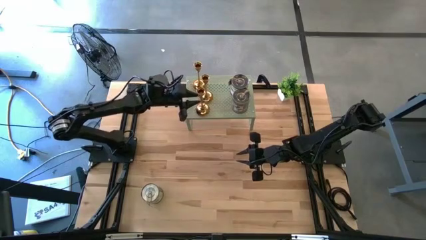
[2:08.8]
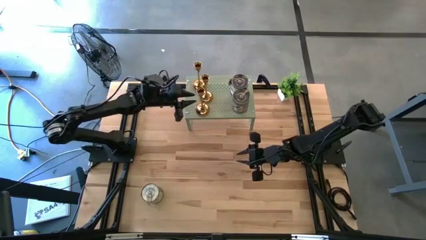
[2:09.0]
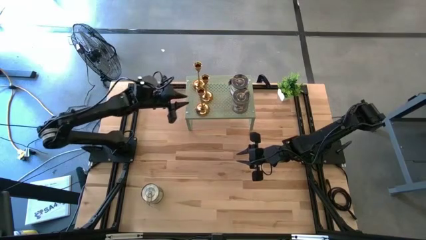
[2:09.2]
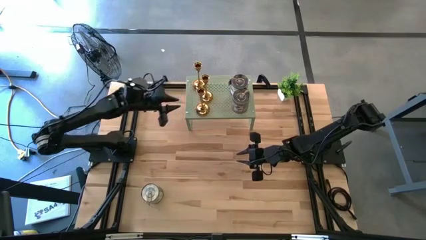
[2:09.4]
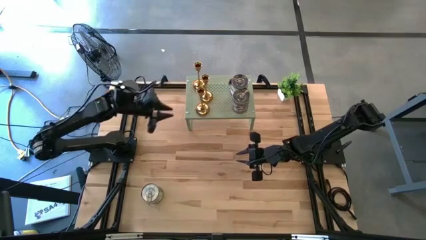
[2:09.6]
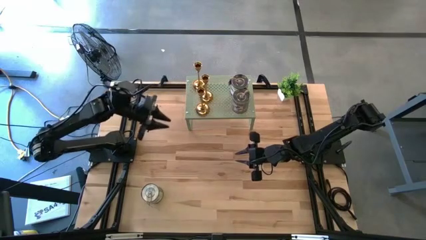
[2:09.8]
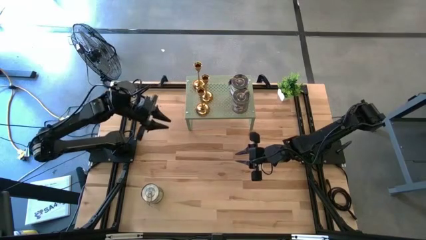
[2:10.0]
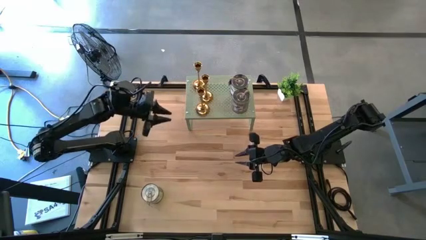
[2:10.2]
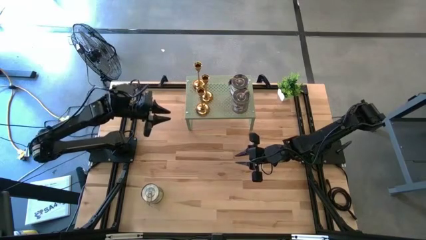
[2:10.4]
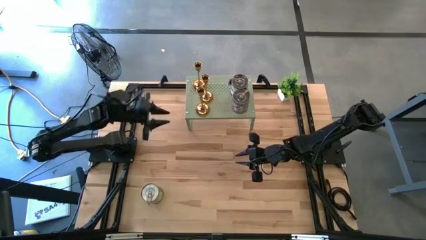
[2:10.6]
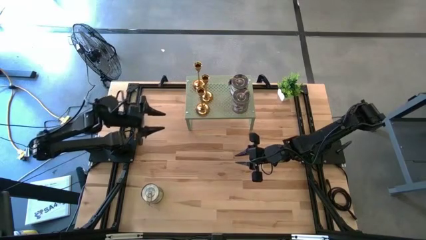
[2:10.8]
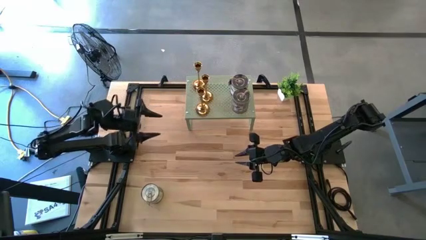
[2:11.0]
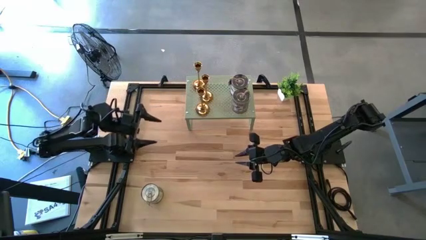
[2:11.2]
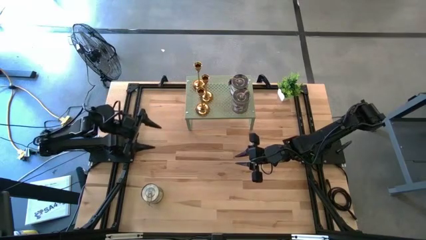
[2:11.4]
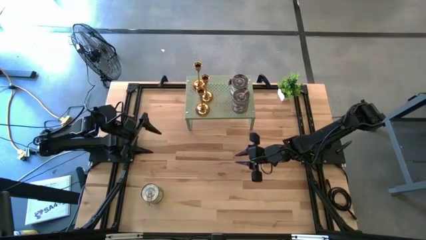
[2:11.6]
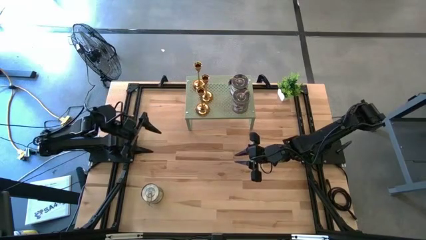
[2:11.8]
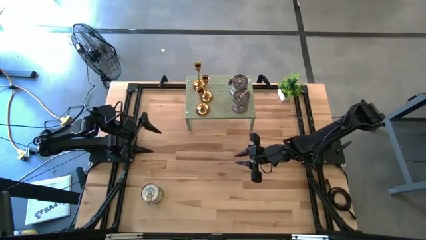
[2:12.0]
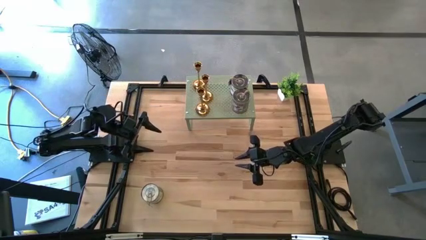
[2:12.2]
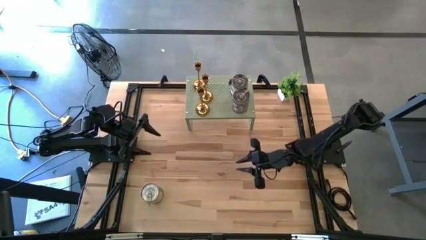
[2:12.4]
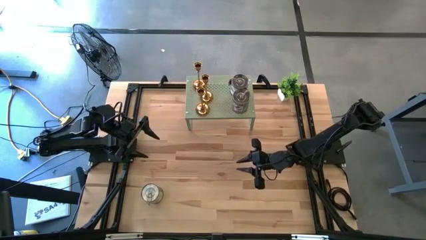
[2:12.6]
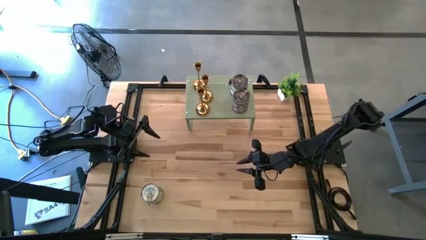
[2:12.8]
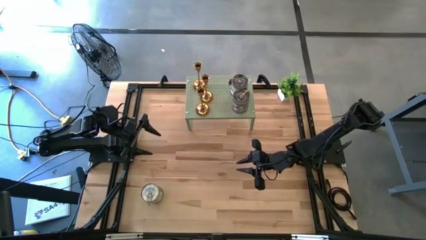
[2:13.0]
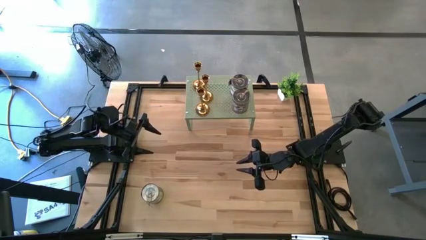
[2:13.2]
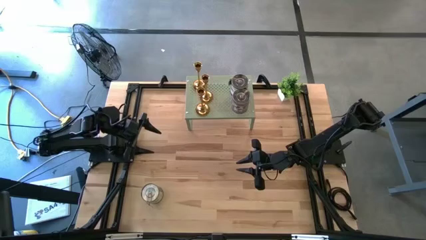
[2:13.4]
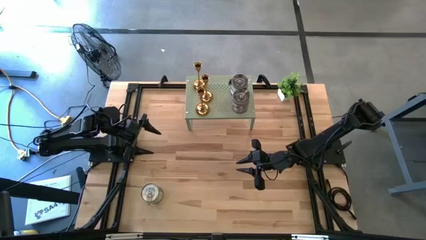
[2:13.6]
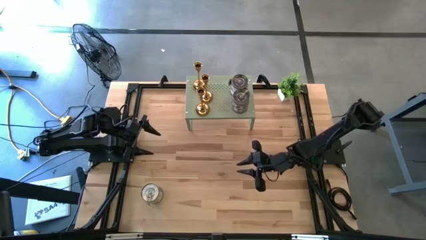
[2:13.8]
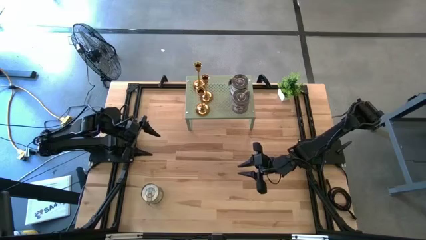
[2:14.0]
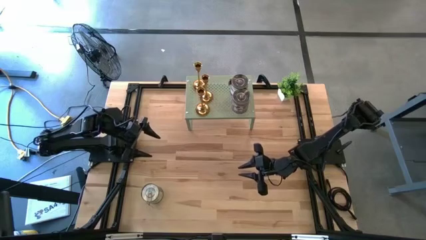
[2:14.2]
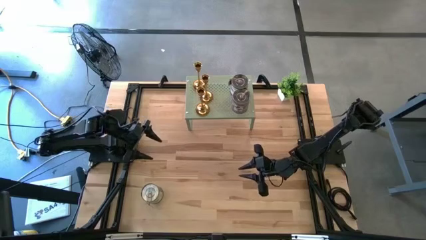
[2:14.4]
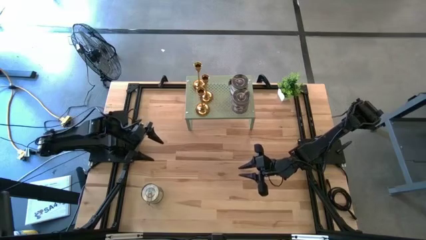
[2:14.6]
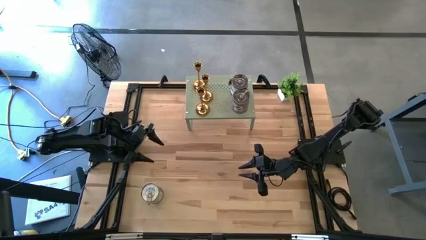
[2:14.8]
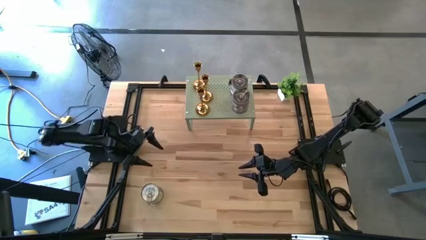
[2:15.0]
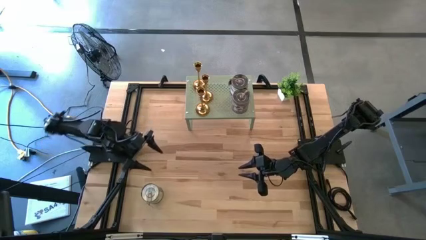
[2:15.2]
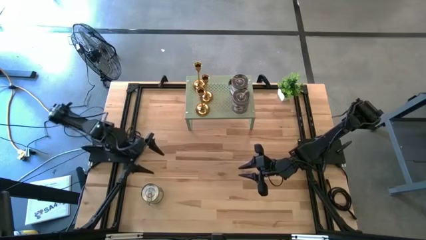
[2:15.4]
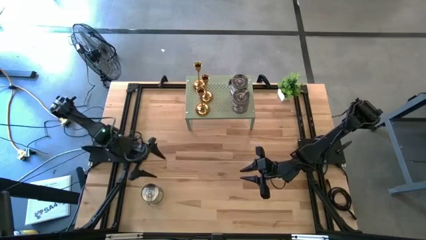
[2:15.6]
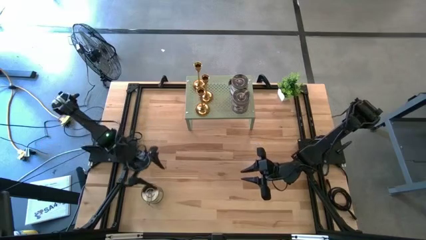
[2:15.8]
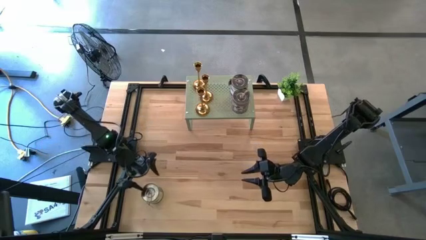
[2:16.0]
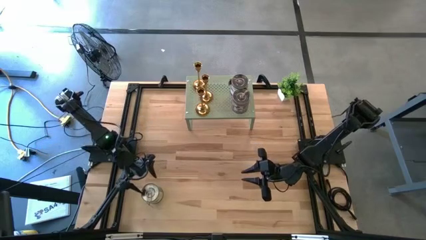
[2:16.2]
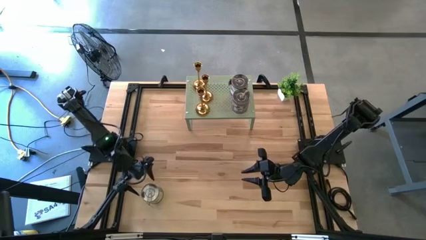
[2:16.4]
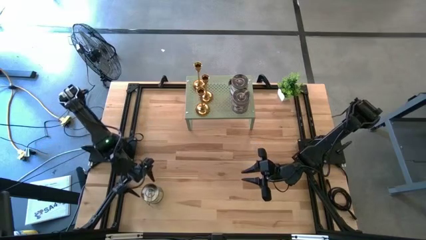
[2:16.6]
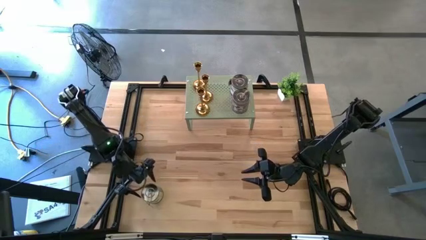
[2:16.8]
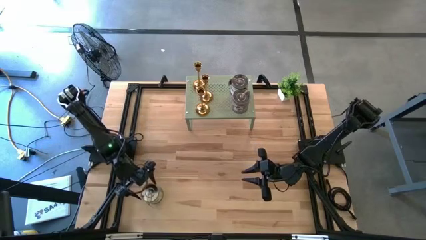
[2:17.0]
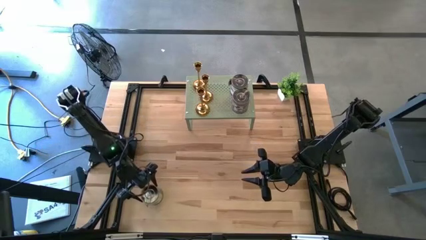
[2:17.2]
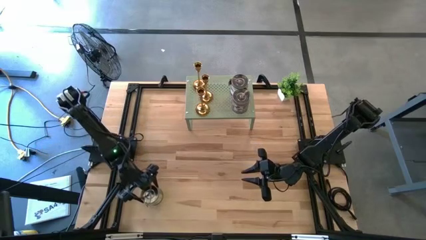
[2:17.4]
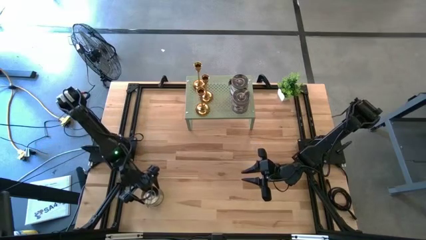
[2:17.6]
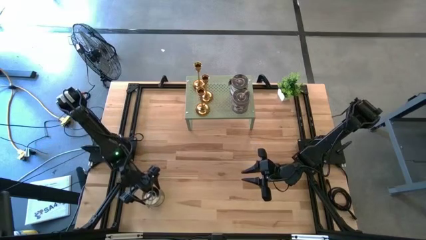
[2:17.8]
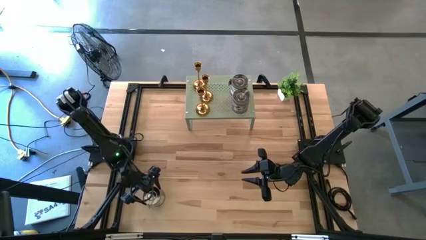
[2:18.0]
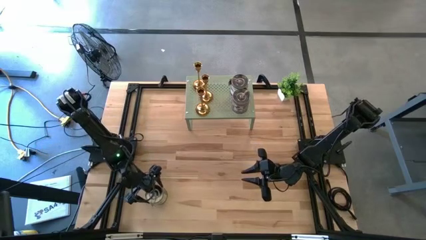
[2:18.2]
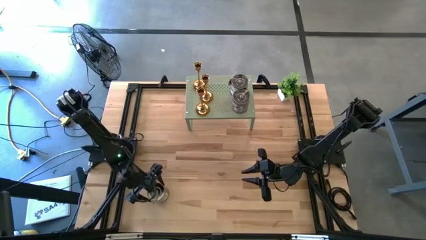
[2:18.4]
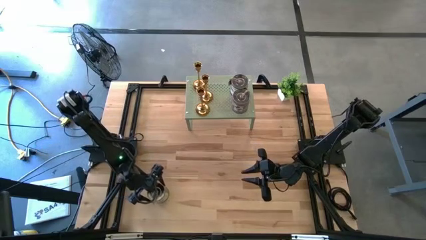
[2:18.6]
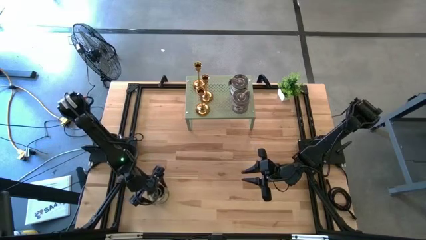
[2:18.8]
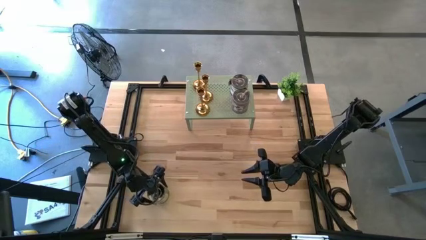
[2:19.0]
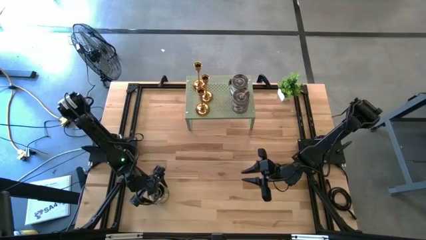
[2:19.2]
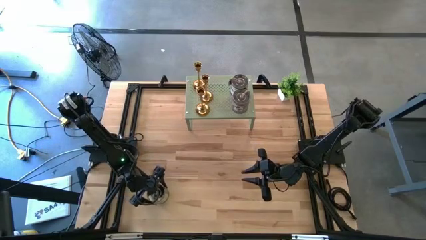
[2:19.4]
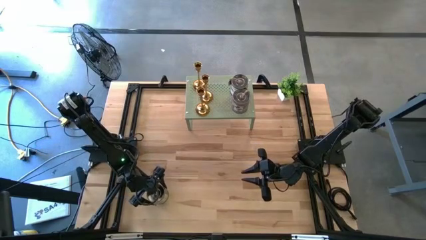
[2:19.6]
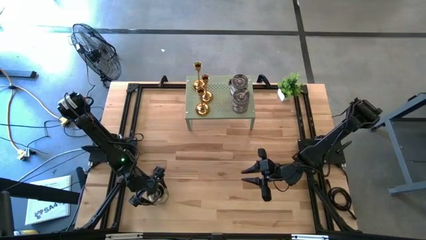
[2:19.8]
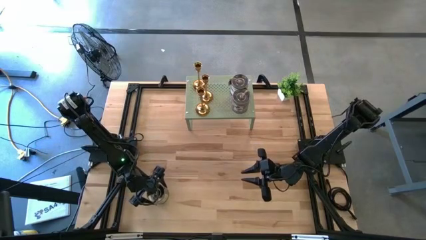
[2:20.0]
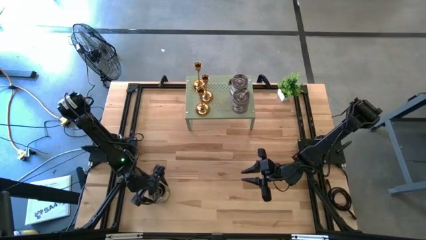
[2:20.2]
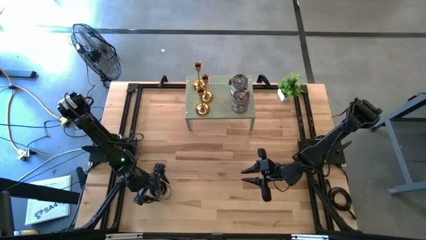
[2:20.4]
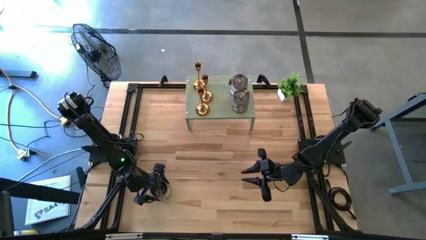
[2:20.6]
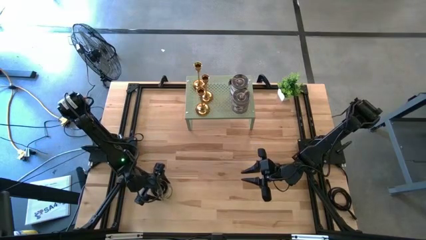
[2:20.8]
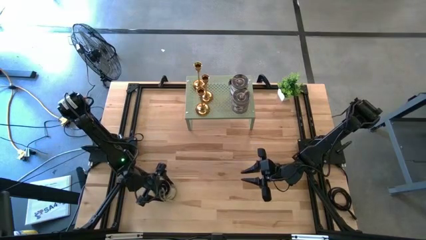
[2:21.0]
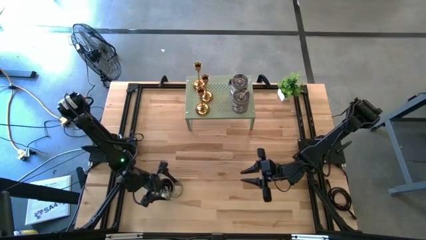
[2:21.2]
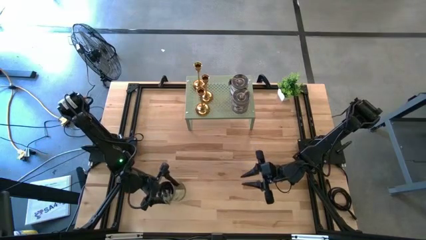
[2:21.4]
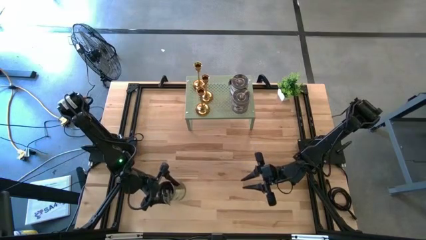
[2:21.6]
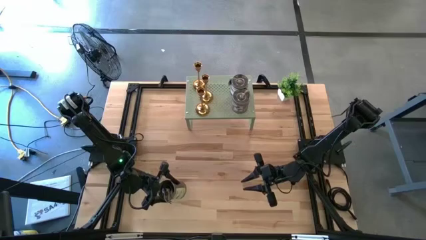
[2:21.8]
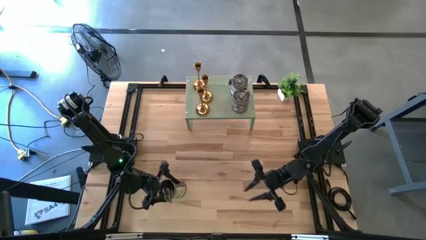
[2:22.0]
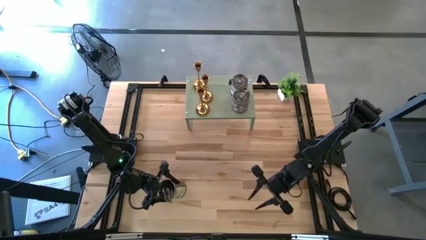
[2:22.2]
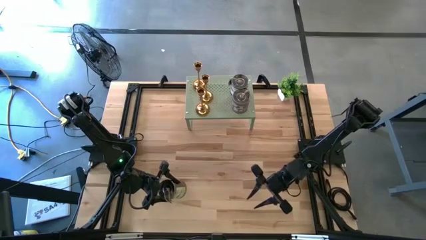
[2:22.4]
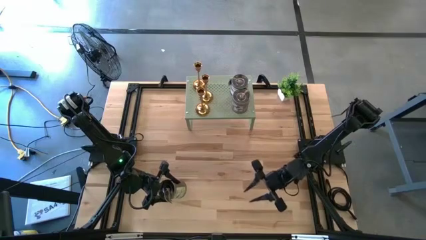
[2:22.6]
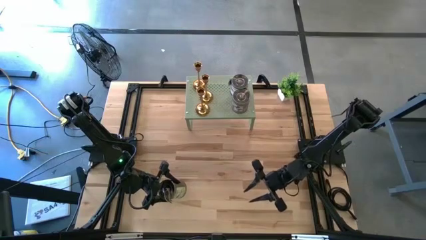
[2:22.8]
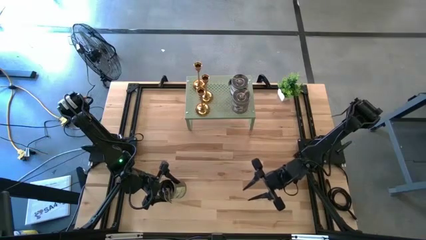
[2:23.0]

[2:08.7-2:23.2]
Task: Pick & Place candle stick holders
Put the silver scented candle on the shelf aligned with the other silver scented candles

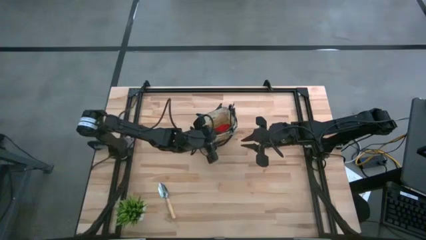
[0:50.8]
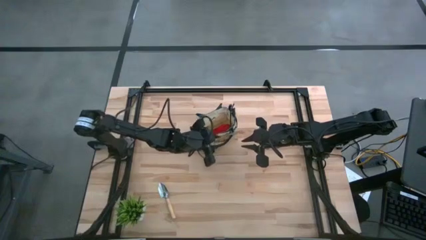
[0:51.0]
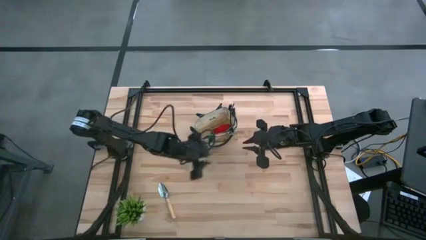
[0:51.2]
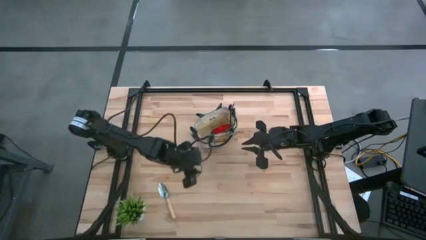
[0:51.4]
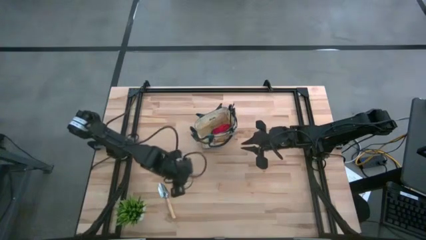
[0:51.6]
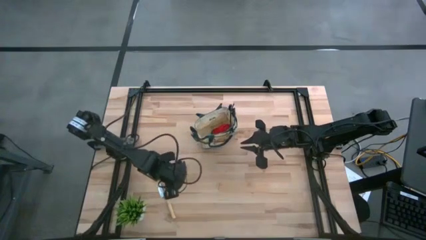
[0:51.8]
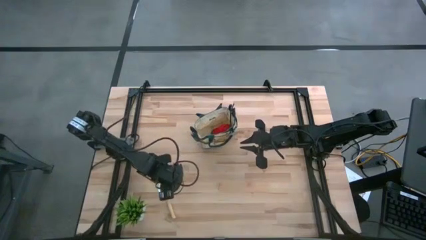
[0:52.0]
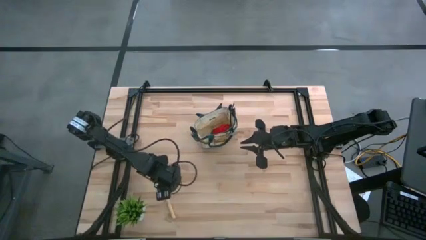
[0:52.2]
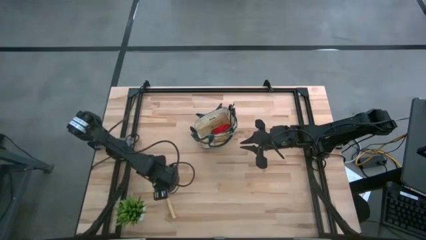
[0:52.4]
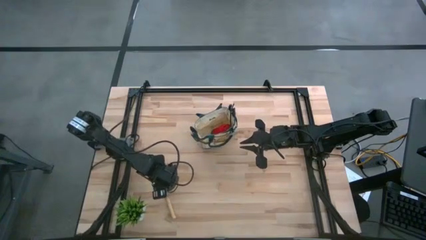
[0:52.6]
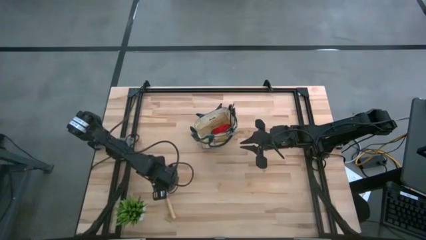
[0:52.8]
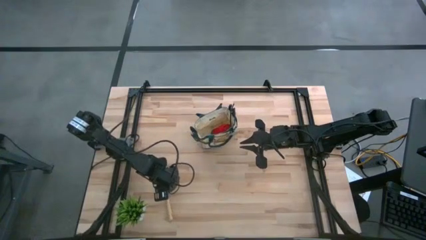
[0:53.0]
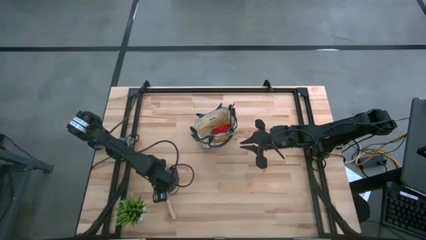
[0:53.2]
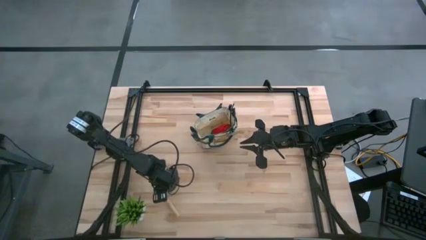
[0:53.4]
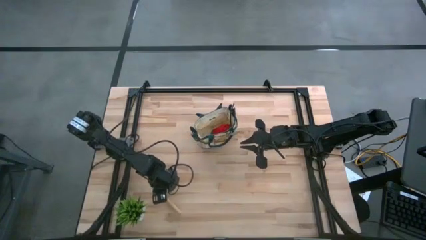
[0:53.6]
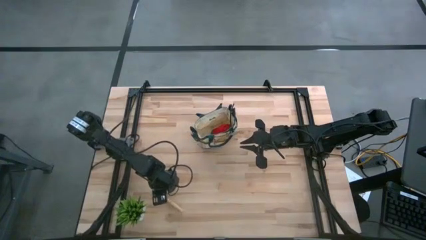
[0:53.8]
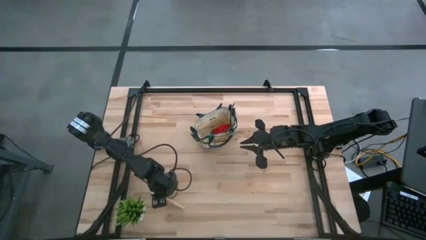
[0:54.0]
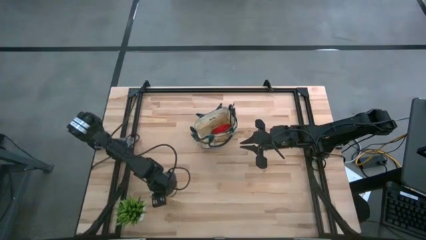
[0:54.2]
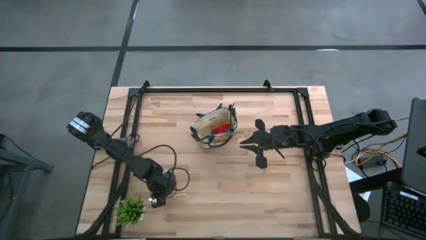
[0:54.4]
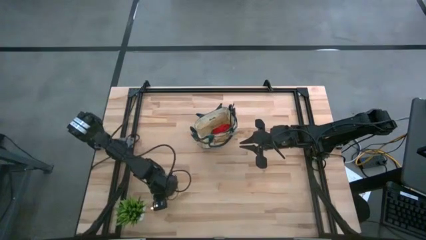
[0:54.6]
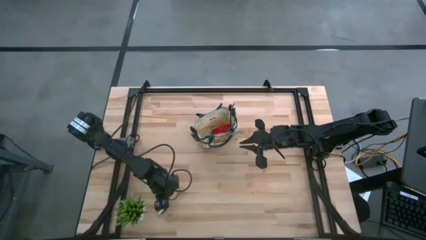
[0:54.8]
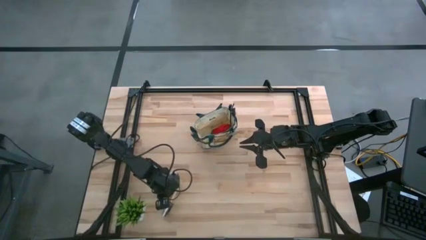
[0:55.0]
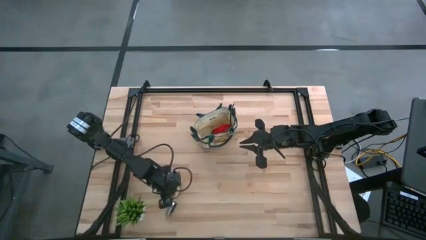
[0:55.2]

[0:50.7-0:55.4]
Task: Pick & Place Garden tools in Gardening bag
Put the brown trowel into the brown gardening bag
